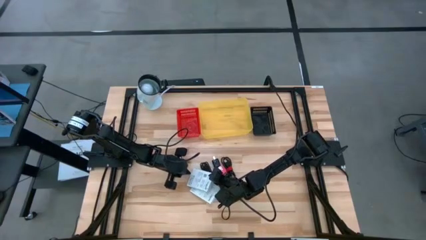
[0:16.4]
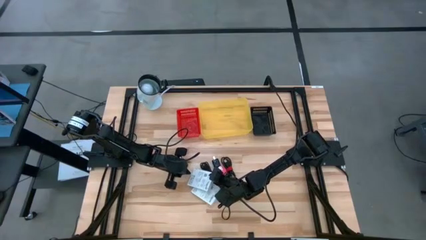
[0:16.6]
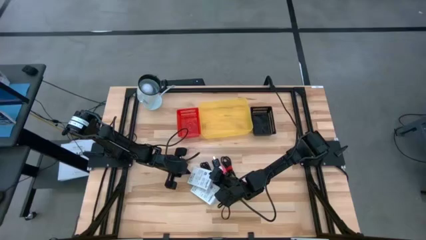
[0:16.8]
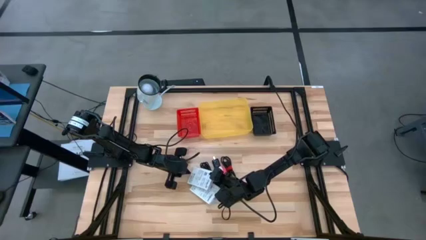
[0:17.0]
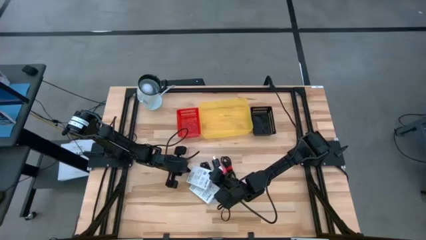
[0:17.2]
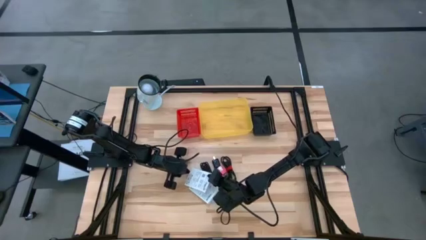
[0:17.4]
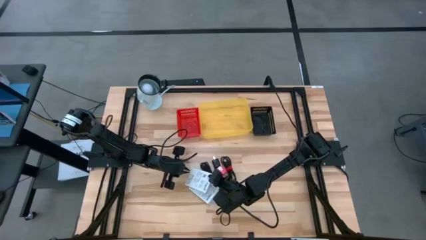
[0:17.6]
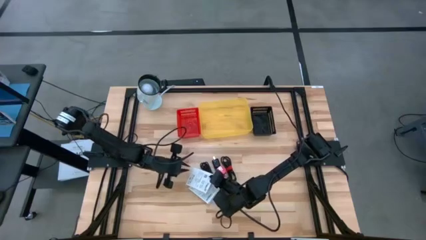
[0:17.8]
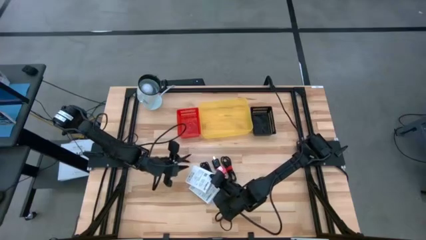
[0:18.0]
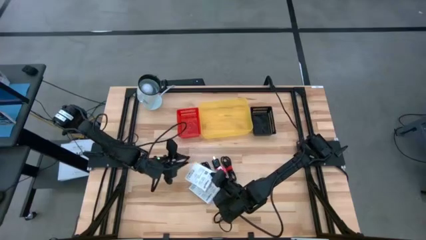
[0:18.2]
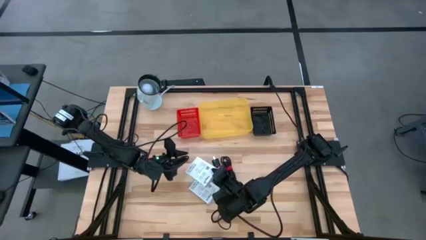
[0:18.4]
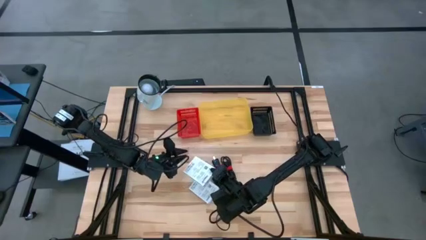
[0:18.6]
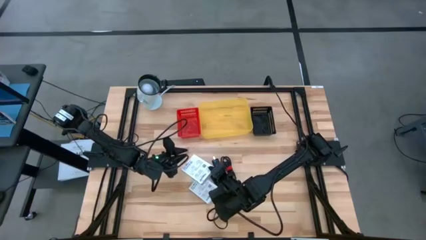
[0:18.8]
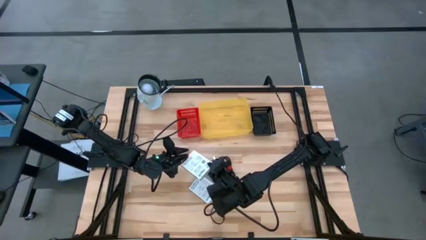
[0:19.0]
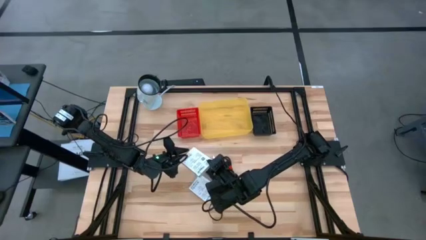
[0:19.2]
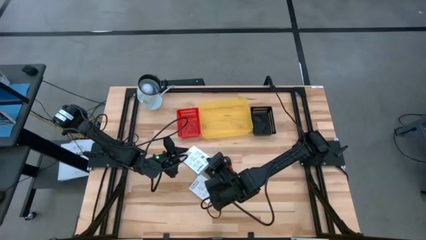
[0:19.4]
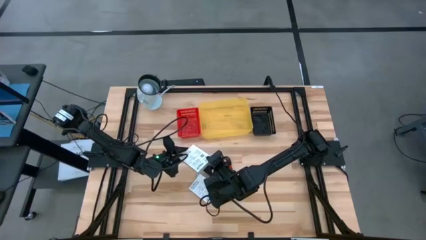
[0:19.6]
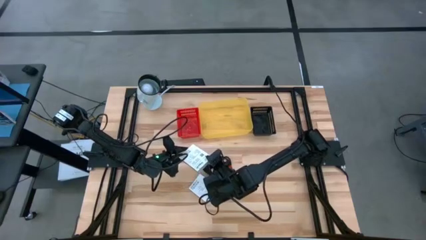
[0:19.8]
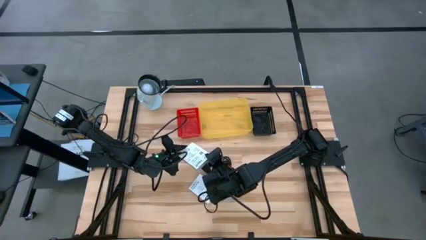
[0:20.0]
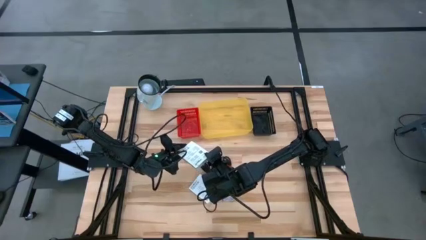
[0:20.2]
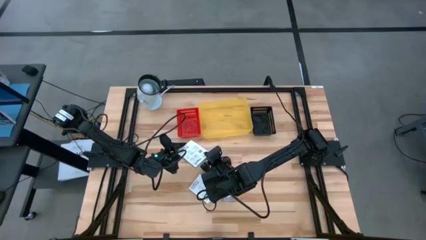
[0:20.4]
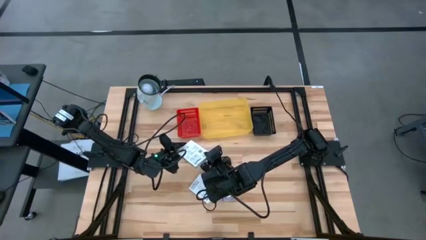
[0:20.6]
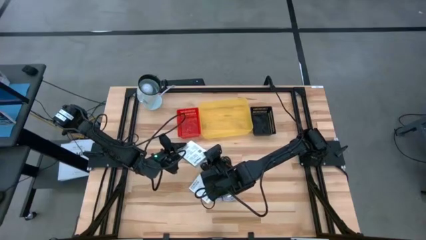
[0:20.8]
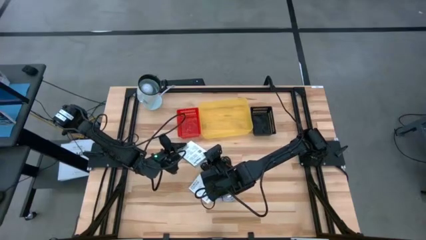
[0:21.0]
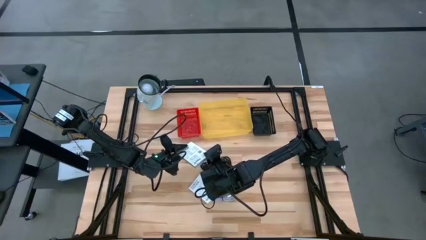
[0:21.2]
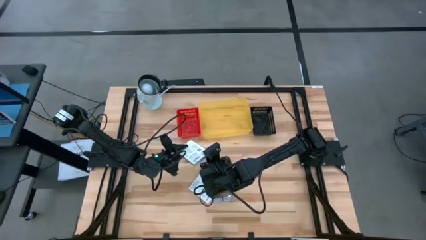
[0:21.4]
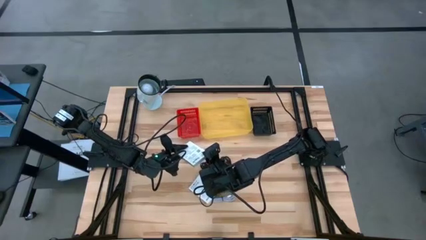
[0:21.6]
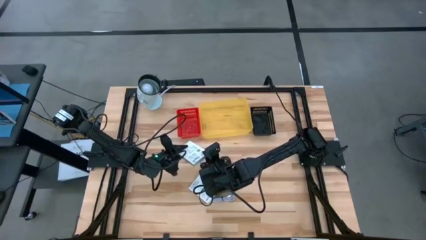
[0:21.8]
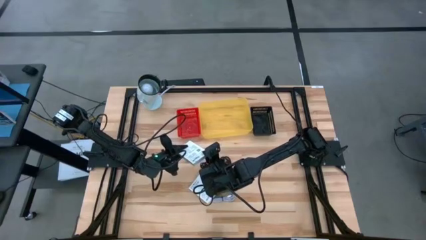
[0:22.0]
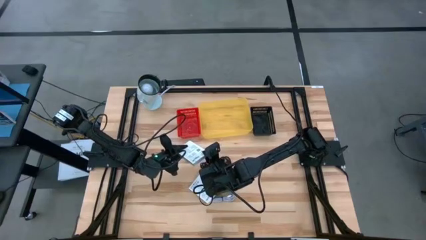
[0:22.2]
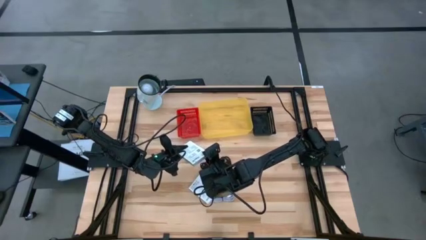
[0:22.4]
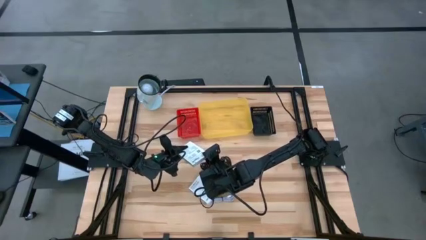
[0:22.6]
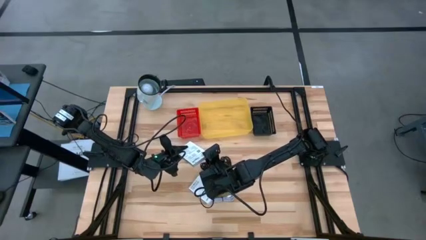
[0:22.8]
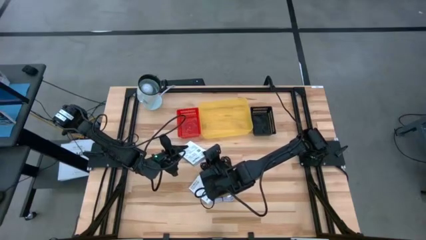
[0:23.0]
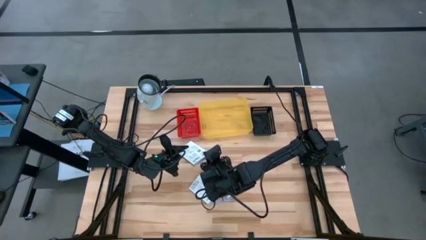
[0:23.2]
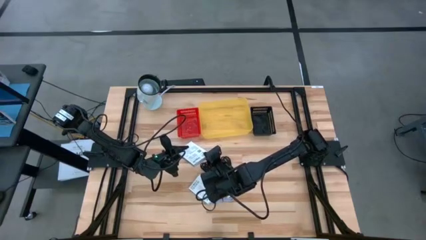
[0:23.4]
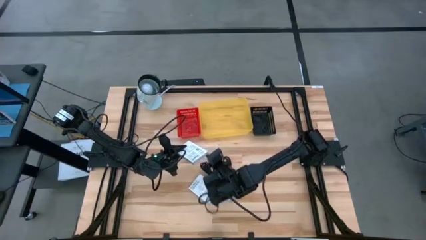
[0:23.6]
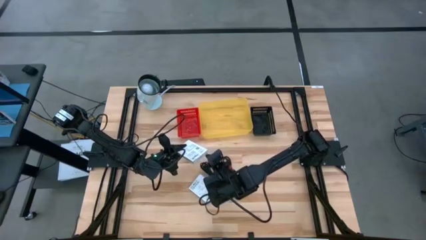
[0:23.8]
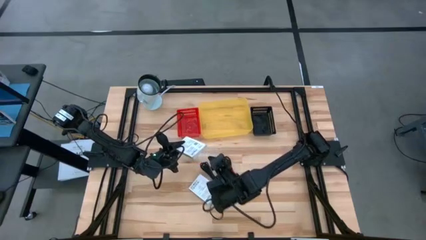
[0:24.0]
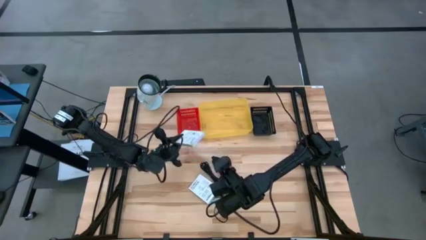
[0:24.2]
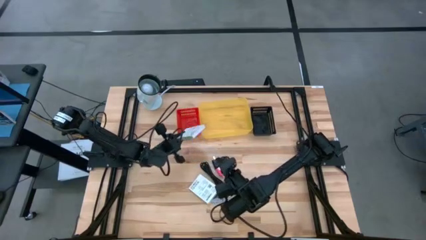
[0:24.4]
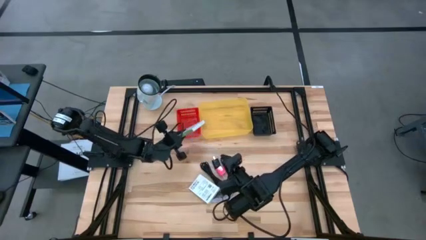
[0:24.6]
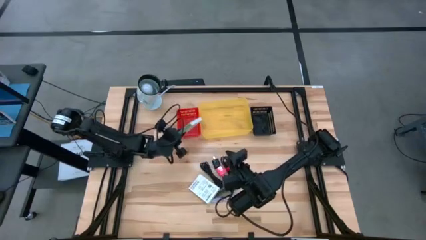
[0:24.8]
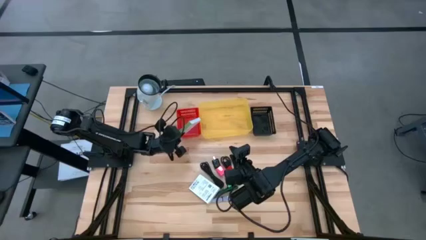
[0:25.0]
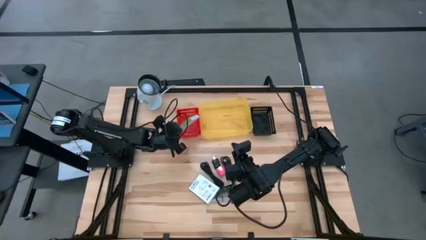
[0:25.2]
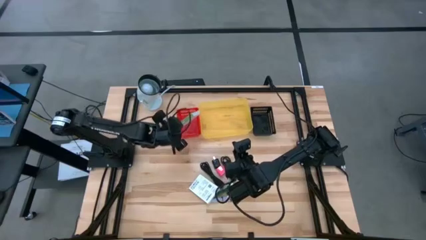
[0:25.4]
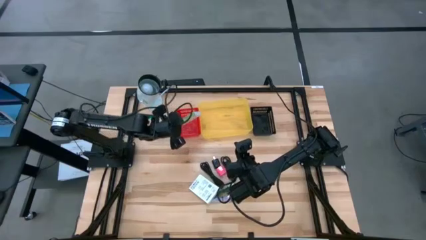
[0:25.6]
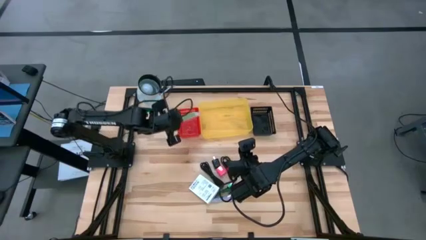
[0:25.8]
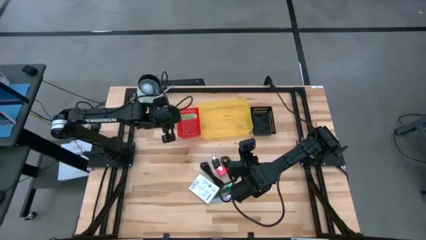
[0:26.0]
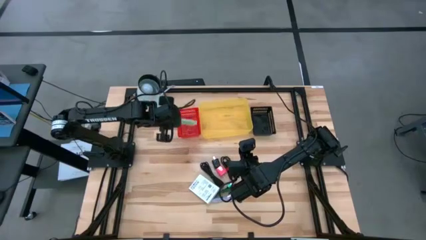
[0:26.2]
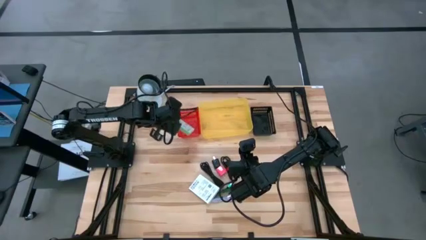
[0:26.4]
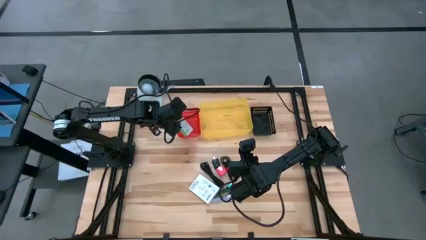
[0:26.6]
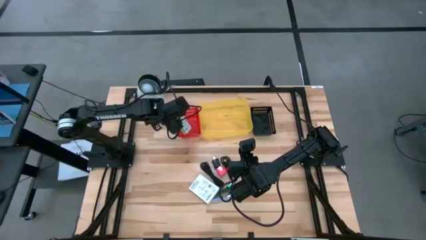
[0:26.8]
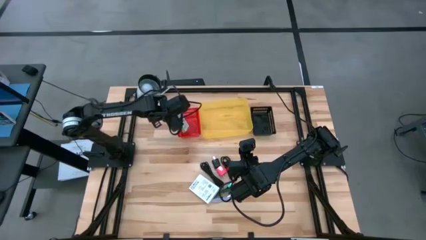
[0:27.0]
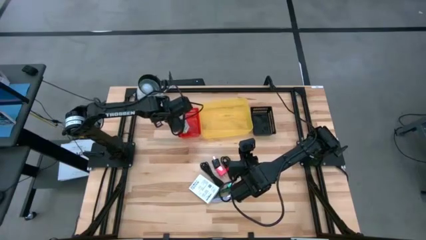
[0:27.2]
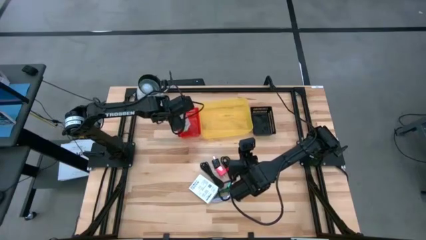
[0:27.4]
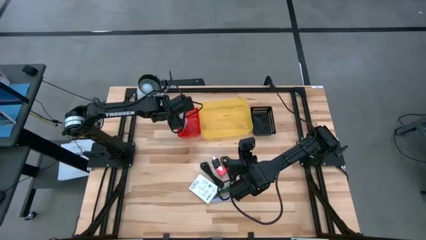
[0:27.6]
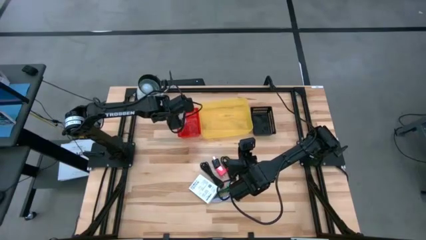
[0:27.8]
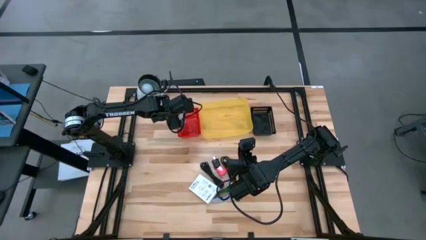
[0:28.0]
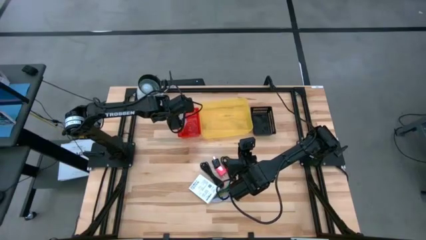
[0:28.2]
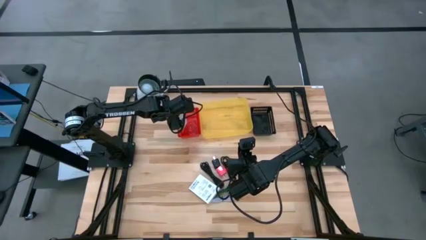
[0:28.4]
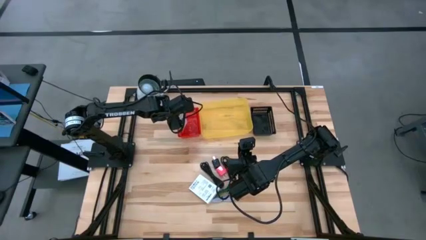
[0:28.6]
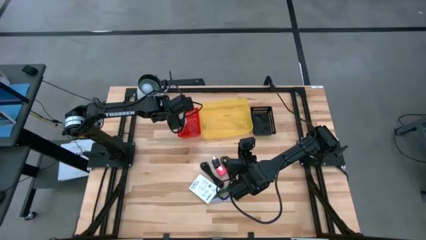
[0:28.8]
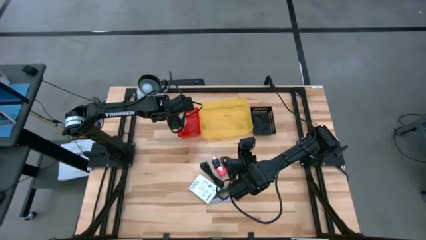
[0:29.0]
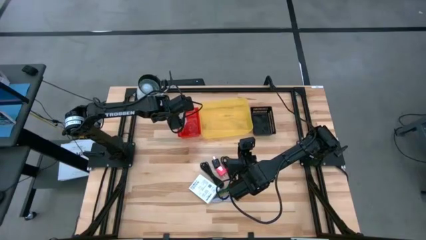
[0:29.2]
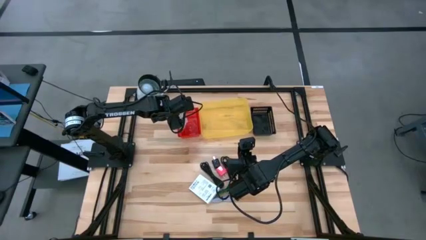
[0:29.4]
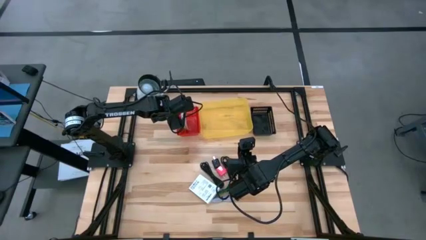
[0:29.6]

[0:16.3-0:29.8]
Task: Pick and place items into bin
Put the top white card reader box into the red bin
